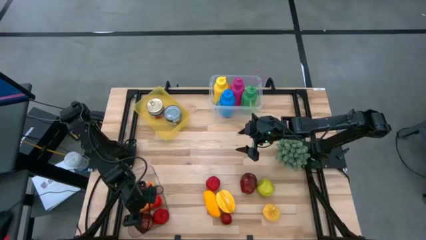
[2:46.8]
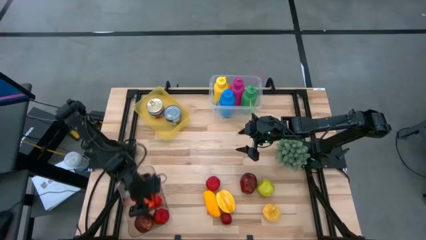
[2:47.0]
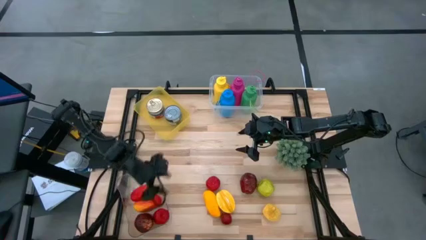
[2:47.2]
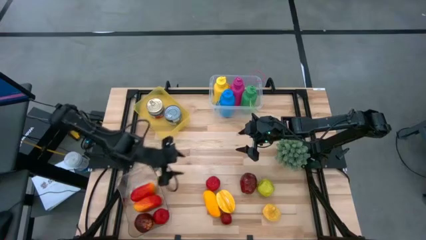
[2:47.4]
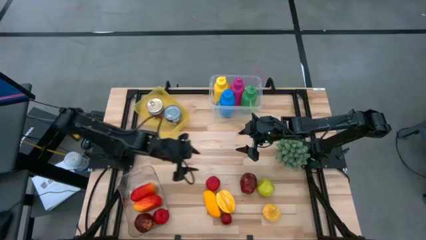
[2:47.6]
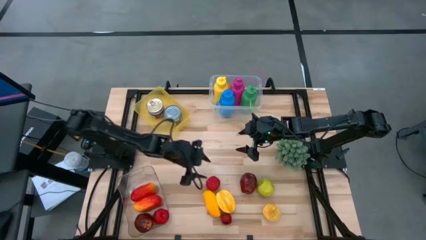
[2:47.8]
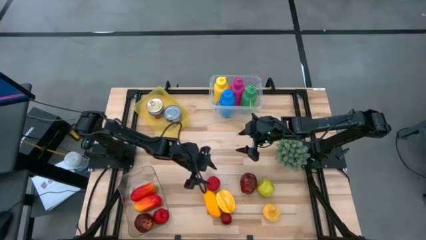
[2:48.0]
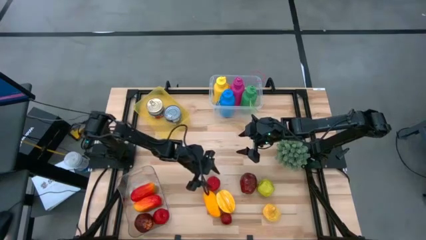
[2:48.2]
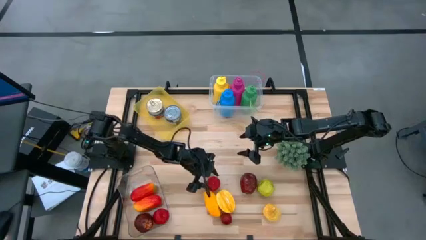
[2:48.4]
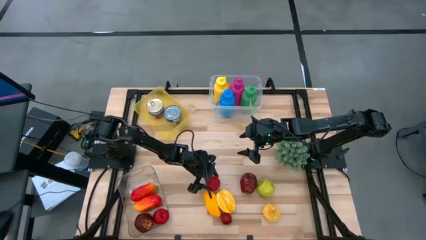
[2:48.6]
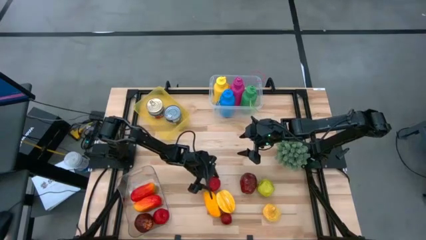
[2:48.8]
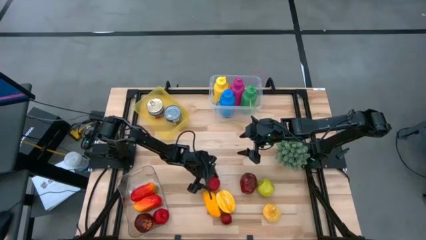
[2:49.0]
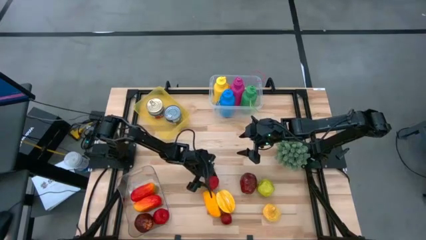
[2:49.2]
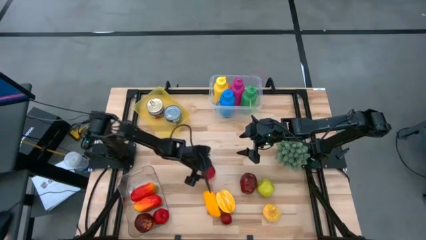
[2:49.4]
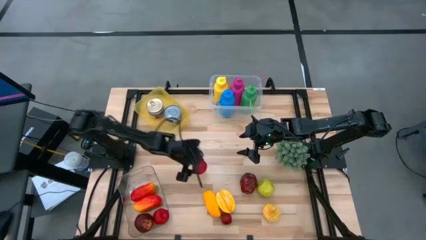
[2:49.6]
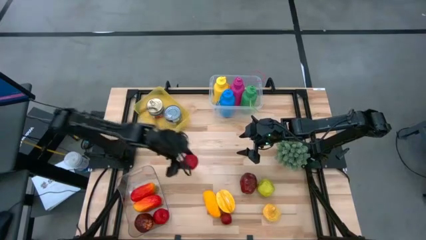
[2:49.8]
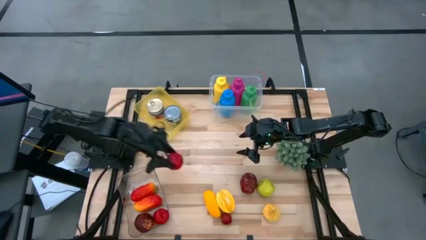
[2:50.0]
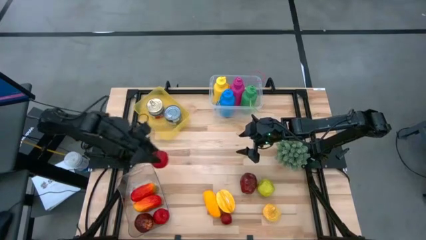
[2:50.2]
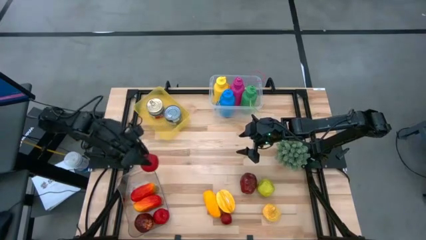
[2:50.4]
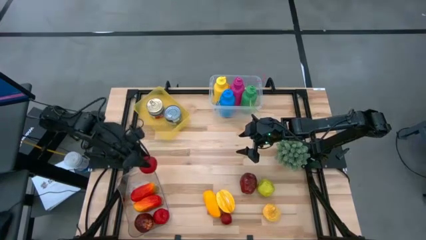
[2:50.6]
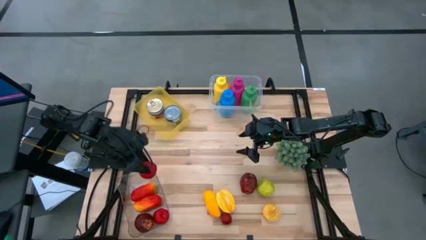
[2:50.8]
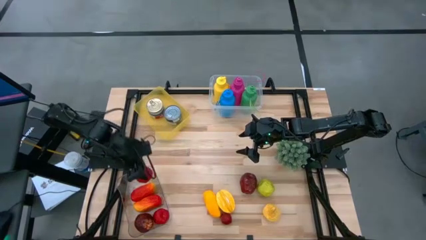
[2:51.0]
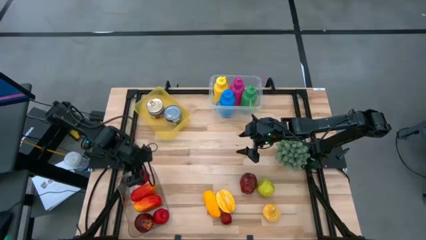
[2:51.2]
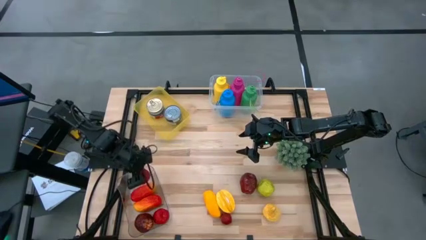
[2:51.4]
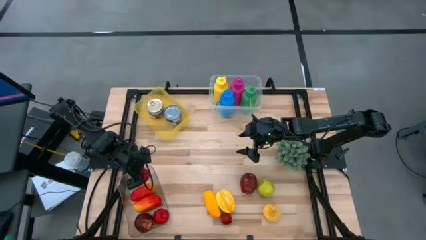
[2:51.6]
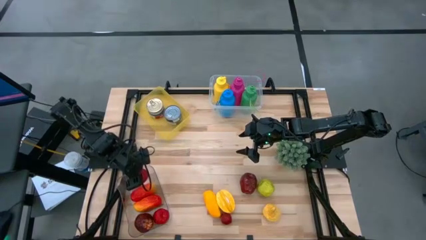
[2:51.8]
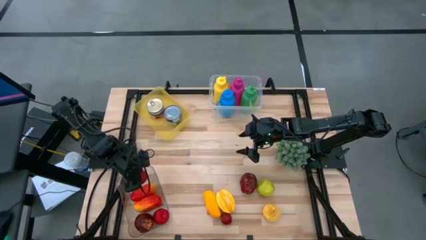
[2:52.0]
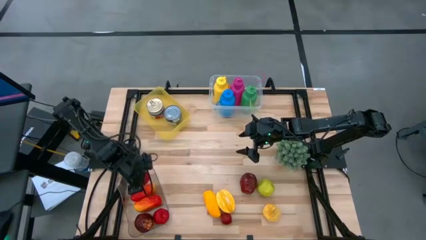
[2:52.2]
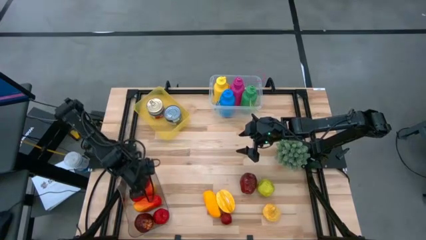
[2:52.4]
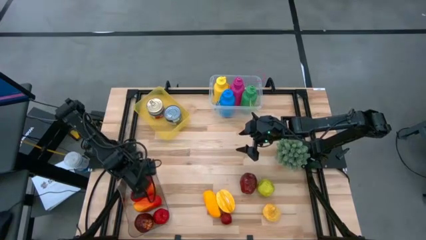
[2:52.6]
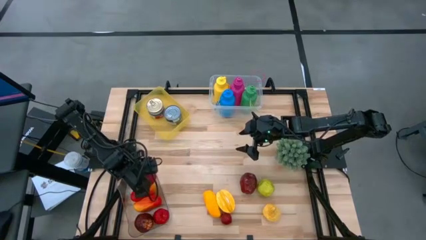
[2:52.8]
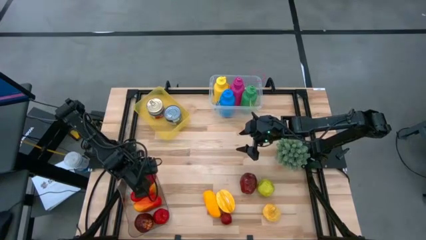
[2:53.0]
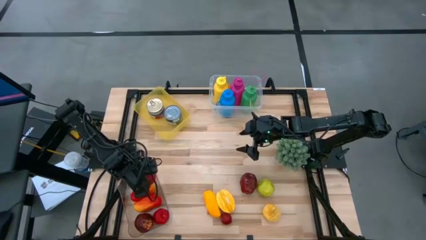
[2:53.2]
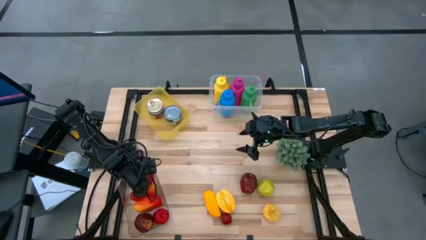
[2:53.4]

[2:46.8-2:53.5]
Task: Pick & Place Food Item
Put the red tomato into the transparent bin

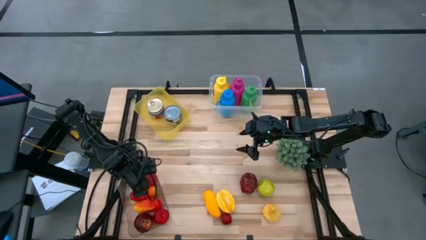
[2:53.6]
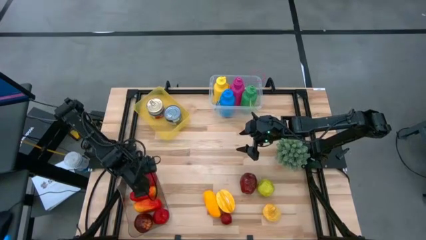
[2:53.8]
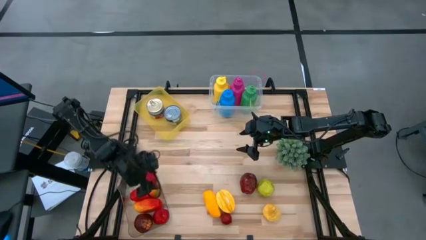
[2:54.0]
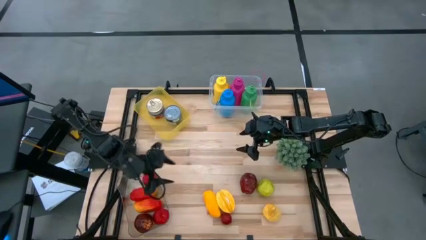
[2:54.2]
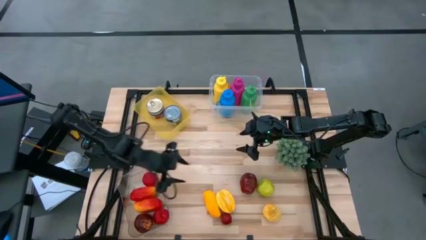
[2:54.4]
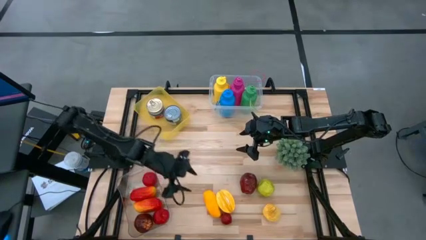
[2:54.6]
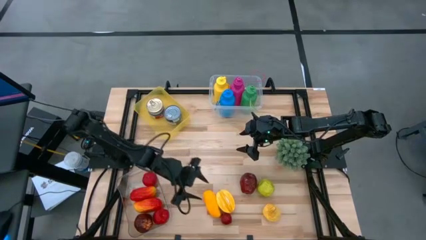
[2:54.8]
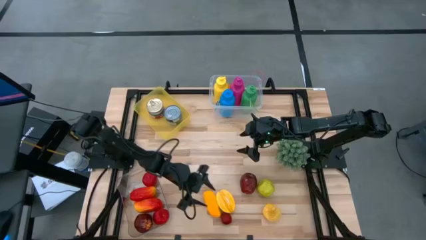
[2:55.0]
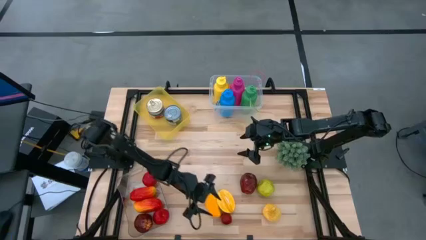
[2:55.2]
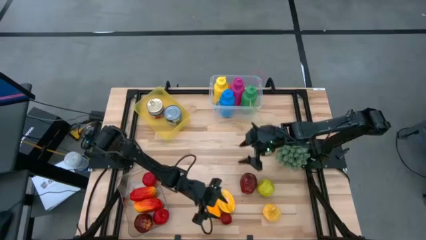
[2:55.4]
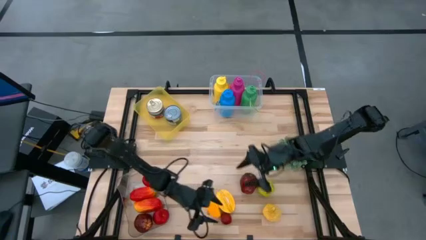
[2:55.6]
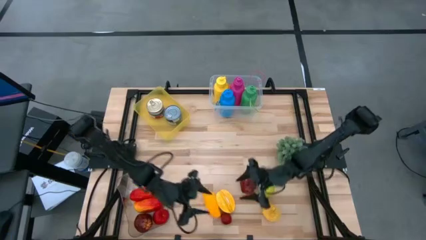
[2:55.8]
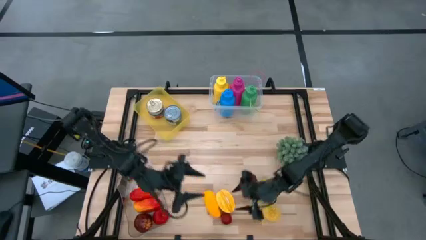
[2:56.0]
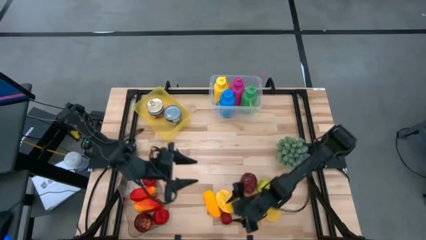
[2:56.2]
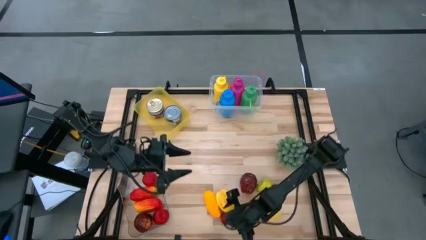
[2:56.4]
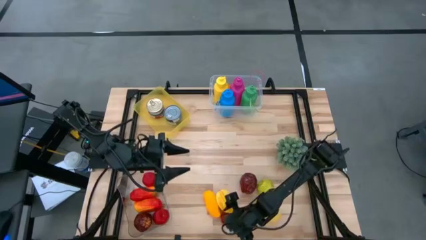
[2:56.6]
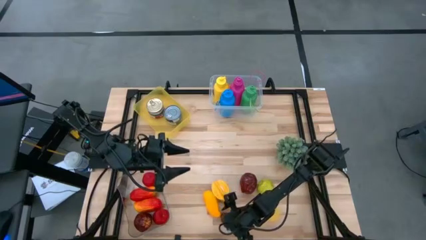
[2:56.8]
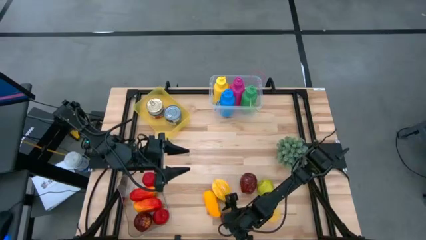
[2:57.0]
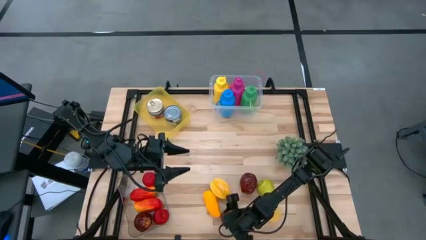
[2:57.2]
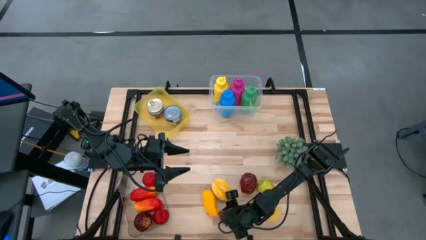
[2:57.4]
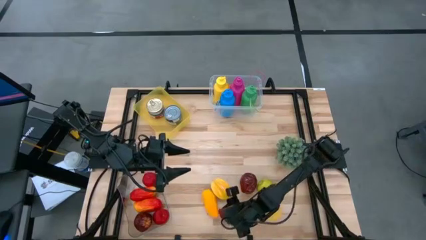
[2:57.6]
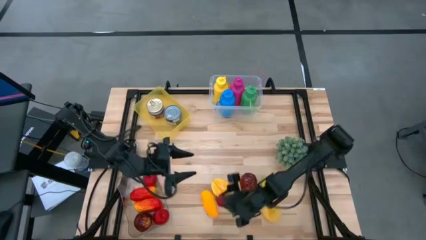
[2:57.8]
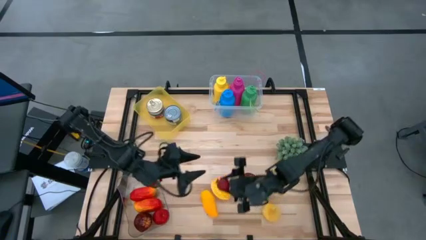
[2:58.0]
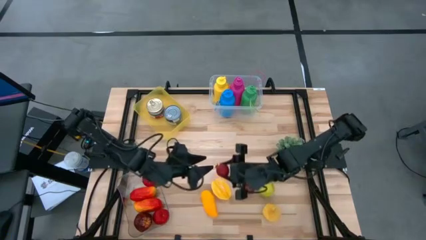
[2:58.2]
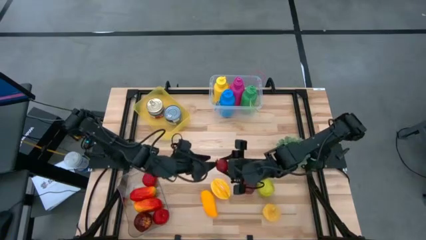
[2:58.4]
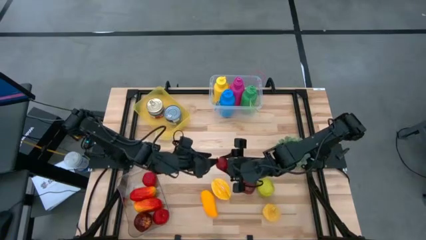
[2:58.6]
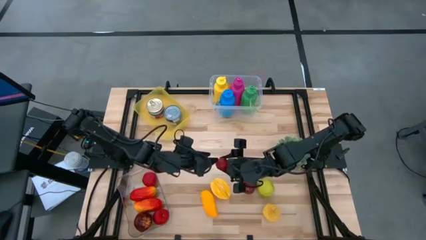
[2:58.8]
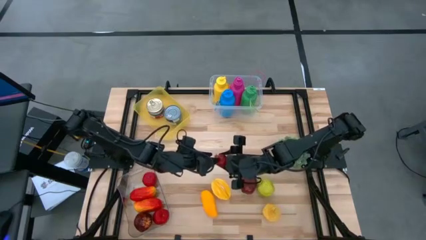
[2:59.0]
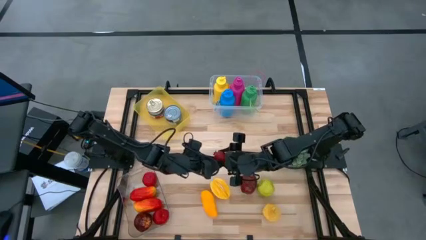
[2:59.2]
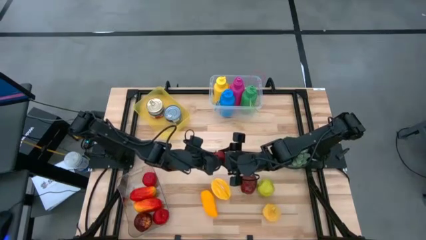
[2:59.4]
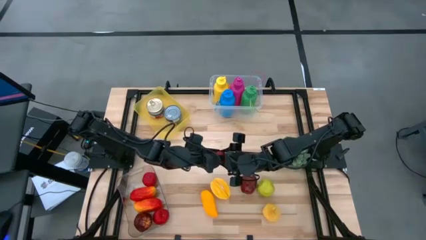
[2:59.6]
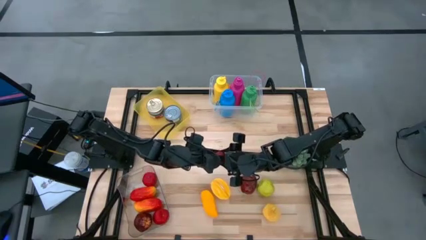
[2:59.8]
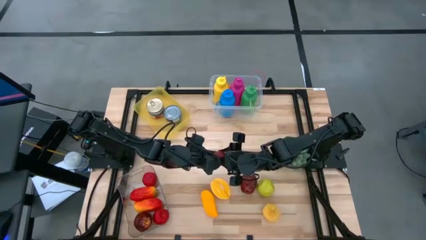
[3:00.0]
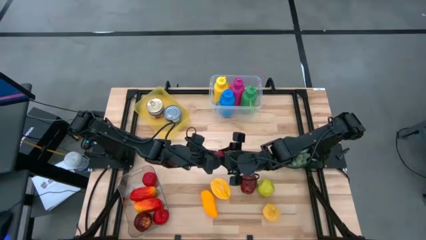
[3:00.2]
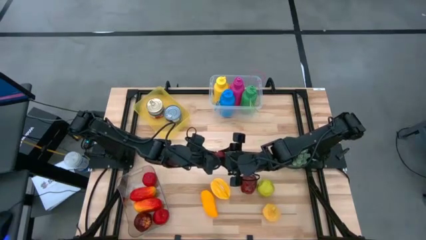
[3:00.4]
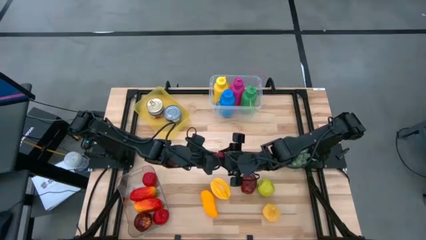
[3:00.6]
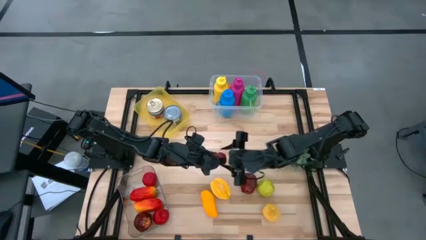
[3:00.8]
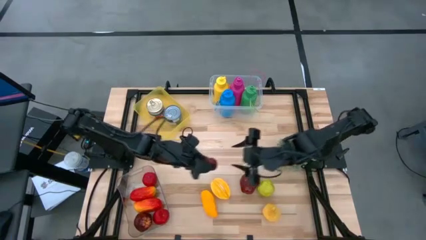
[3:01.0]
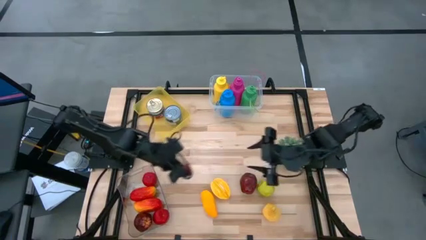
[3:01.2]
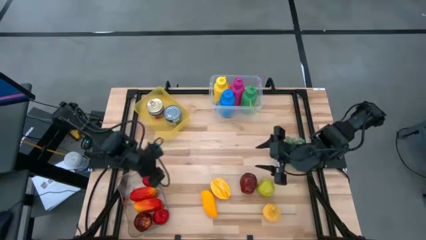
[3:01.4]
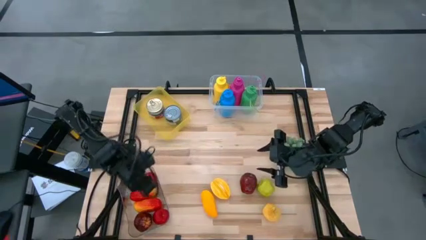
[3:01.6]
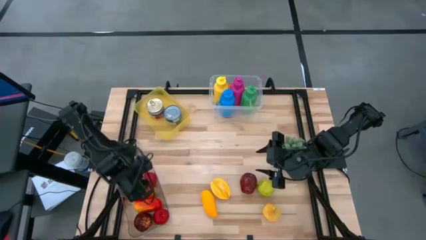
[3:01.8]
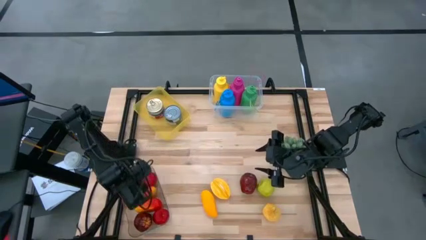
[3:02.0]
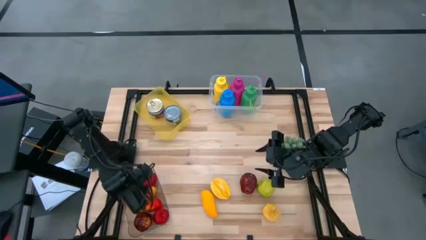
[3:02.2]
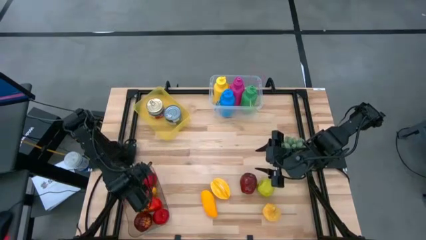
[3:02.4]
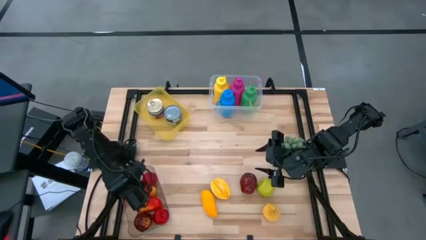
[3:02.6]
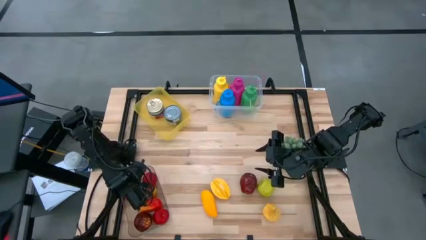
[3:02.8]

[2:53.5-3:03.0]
Put the red pomegranate into the transparent bin
